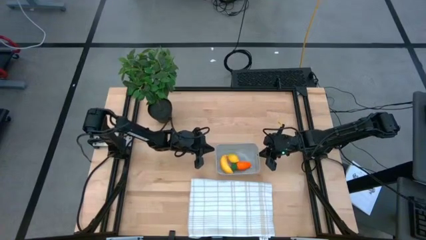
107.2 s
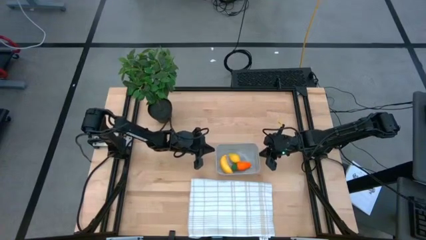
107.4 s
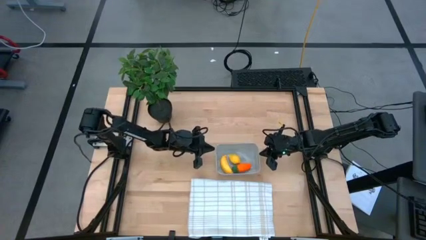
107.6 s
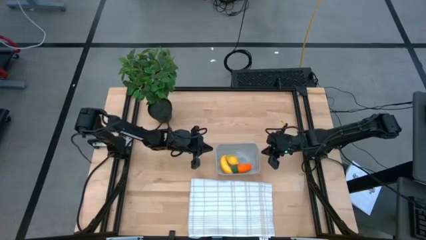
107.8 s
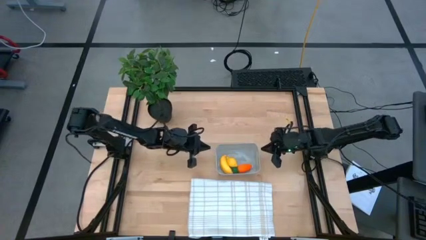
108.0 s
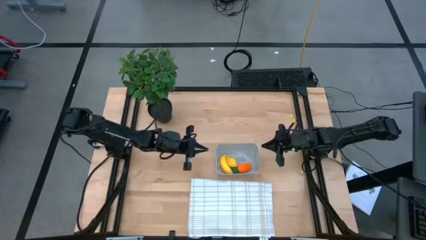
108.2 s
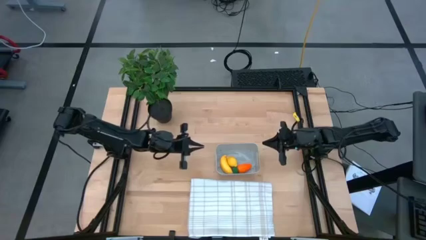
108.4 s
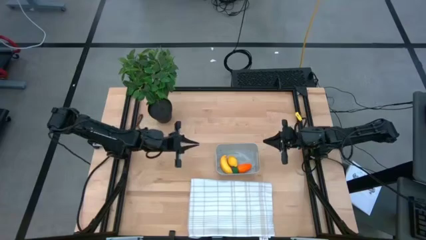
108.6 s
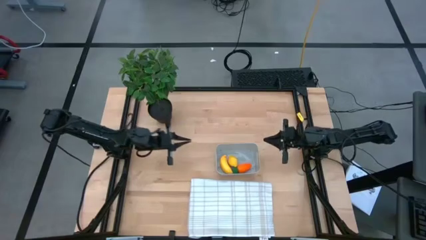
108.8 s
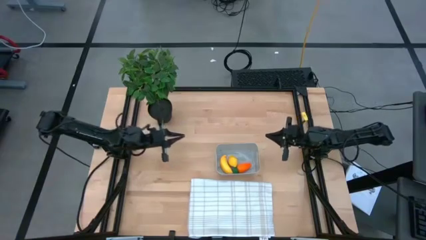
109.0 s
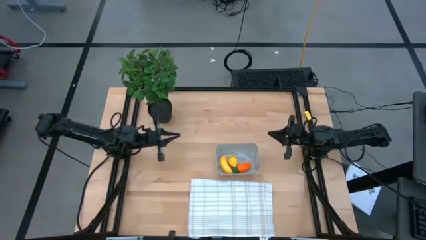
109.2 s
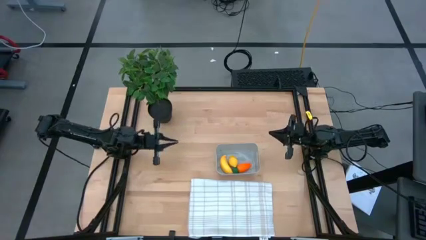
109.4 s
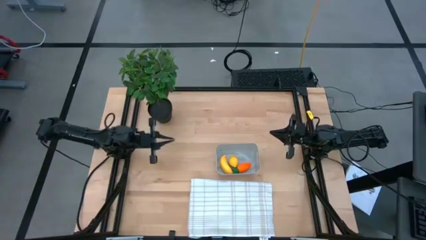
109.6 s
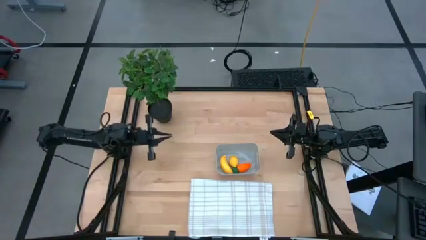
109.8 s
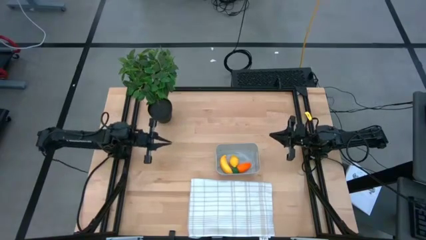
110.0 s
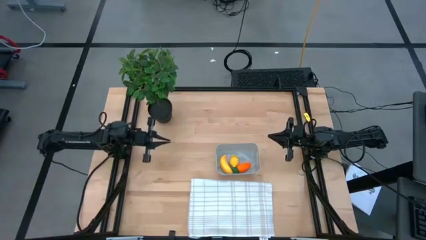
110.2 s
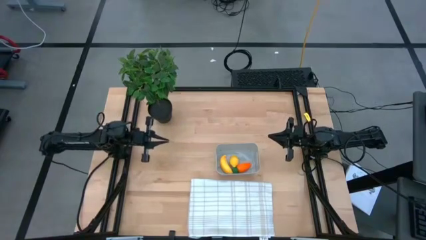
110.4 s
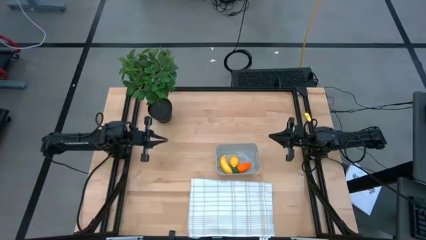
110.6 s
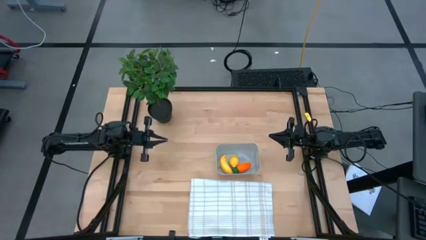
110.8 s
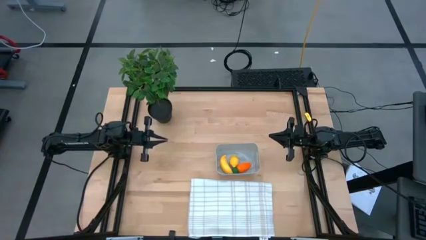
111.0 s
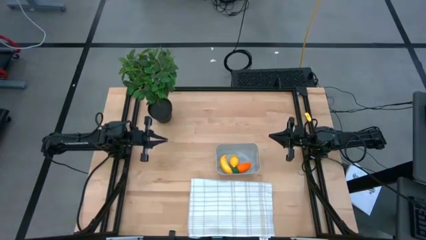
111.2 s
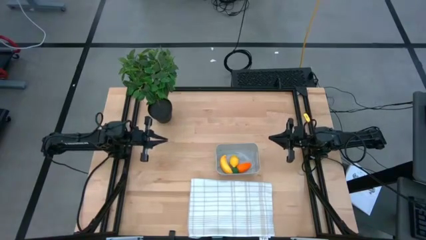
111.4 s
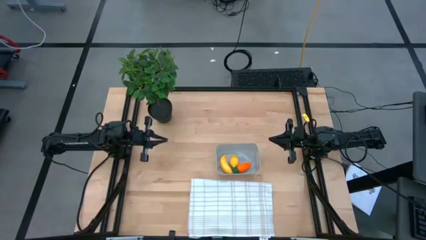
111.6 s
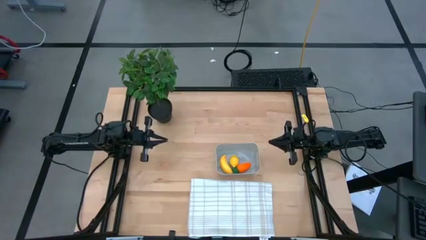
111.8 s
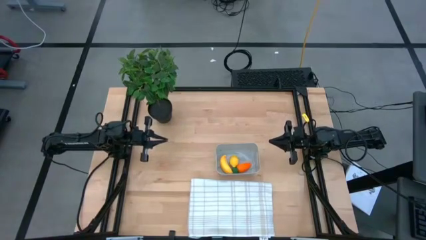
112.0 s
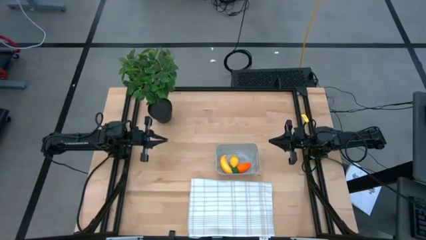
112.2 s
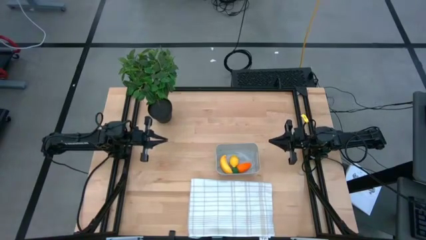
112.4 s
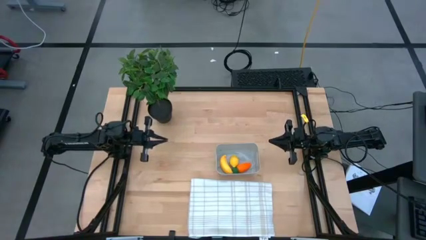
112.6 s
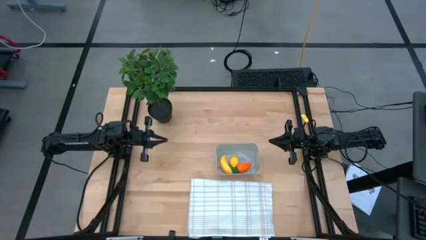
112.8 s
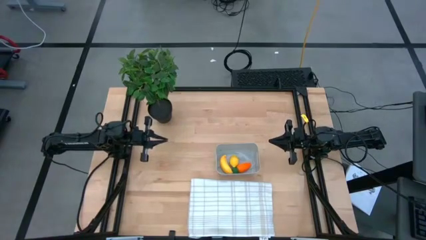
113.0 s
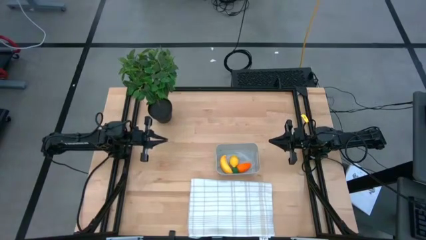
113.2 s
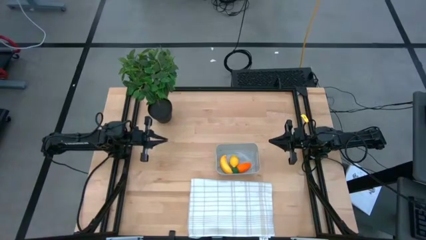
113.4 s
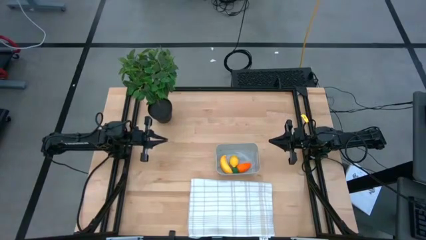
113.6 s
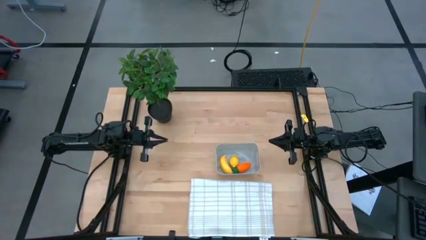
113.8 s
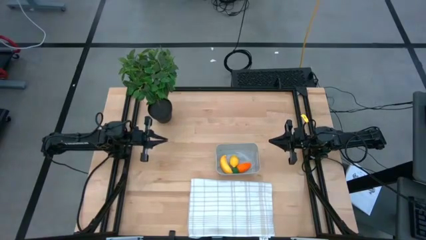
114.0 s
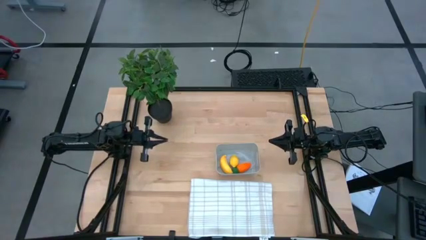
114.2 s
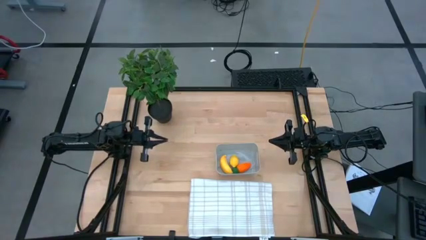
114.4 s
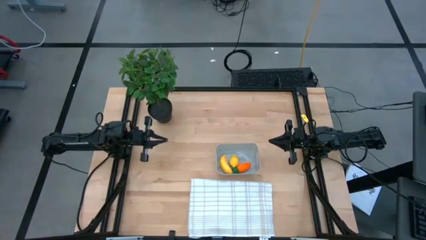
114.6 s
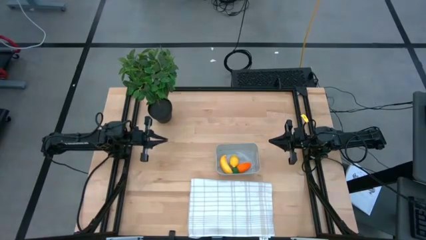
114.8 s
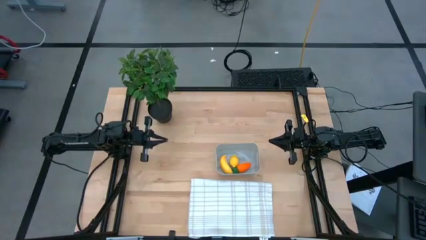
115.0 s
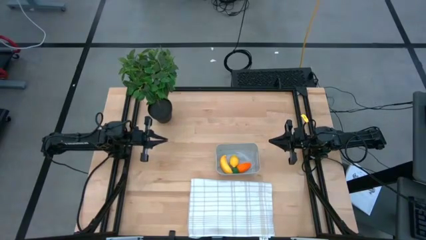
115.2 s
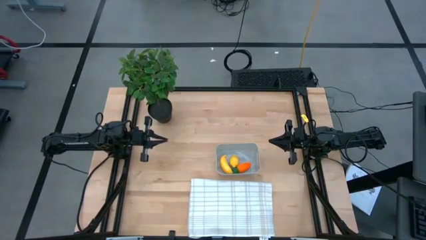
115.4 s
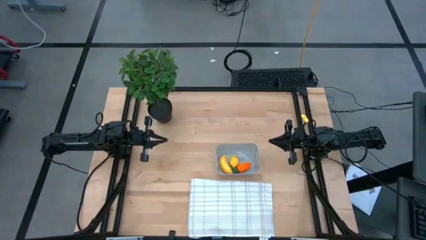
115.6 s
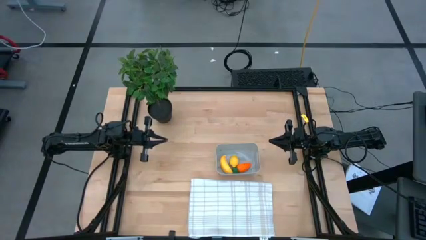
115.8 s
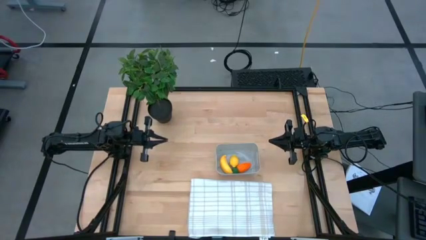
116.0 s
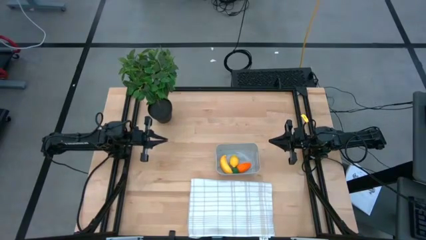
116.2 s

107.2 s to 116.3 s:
Task: Pick and placing Produce into tupperware
Return to Home Position

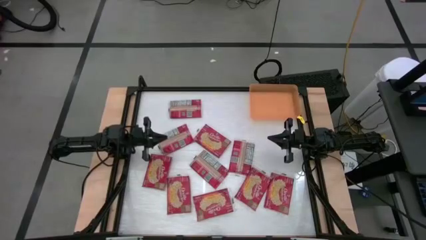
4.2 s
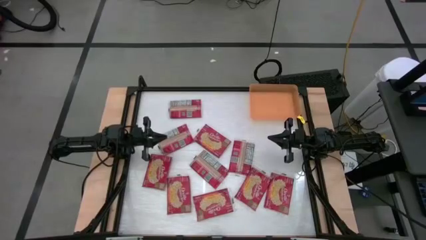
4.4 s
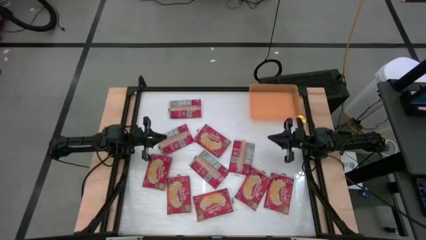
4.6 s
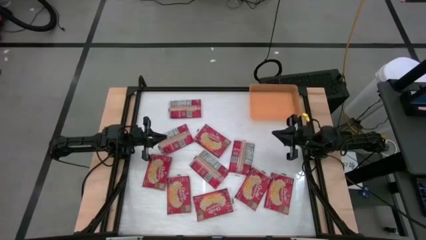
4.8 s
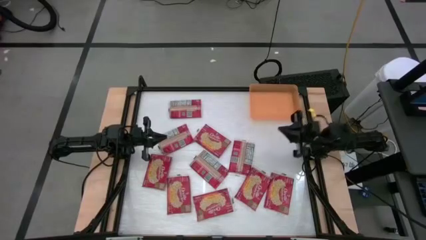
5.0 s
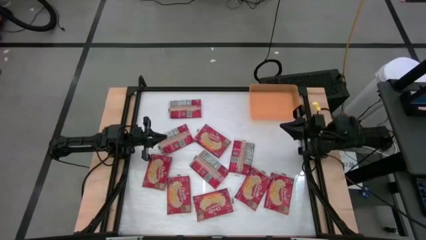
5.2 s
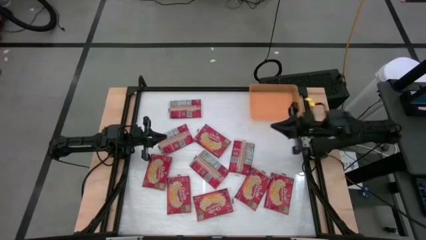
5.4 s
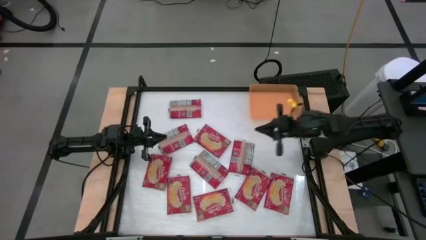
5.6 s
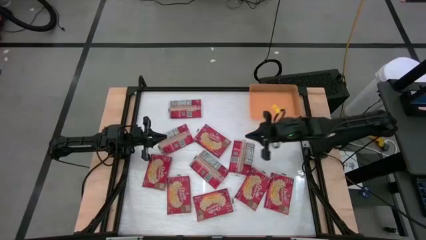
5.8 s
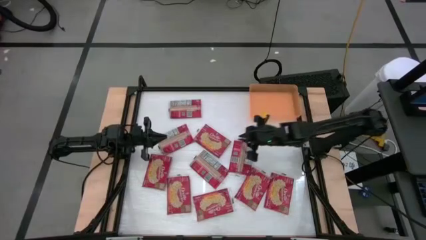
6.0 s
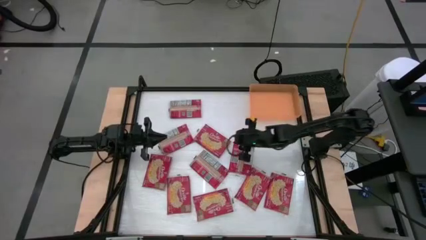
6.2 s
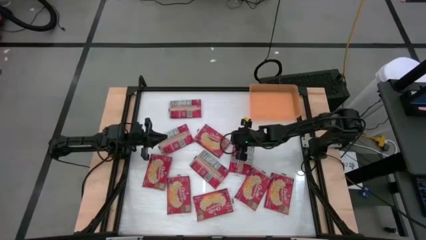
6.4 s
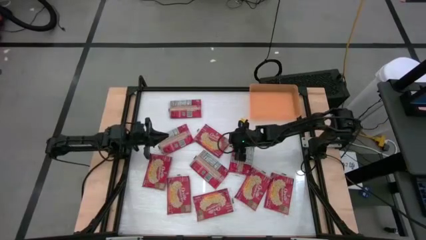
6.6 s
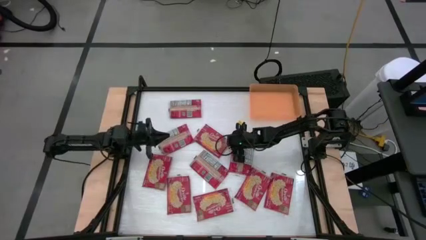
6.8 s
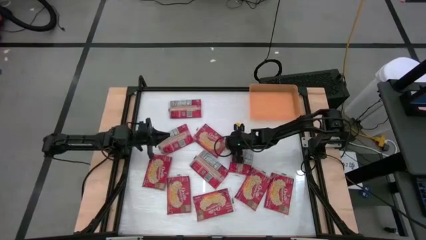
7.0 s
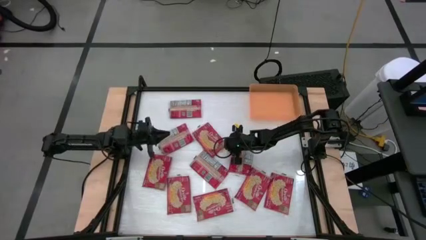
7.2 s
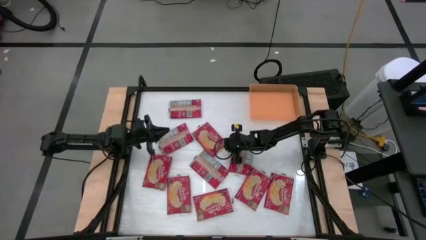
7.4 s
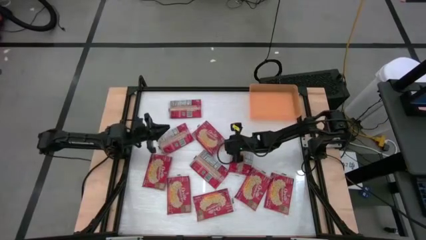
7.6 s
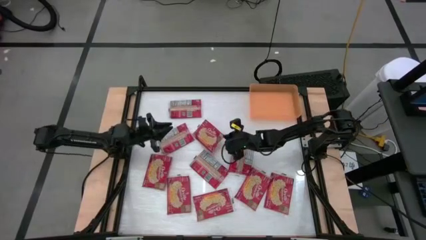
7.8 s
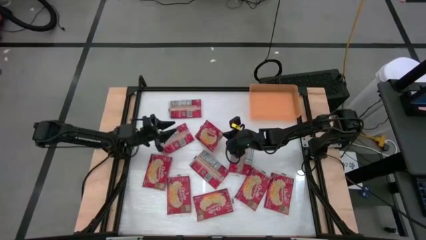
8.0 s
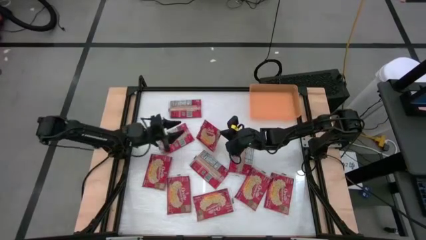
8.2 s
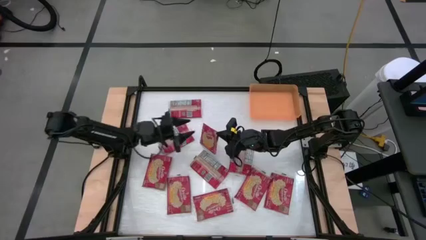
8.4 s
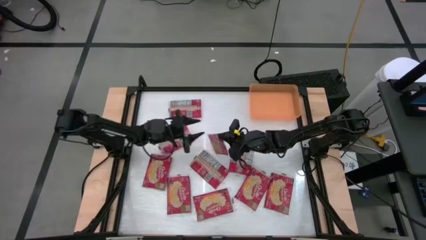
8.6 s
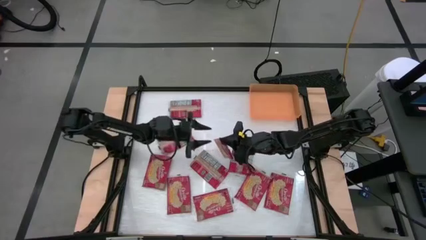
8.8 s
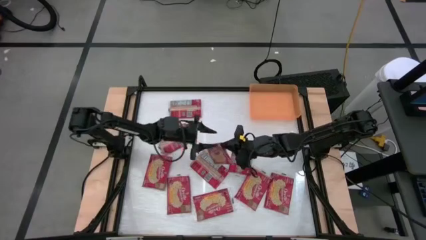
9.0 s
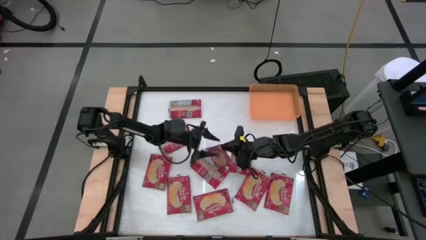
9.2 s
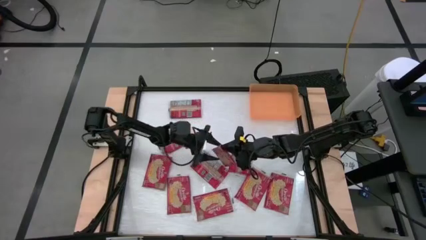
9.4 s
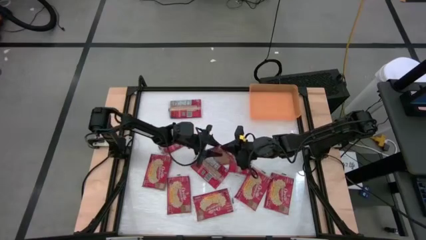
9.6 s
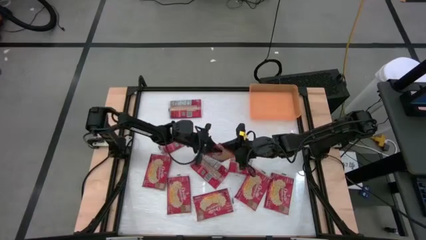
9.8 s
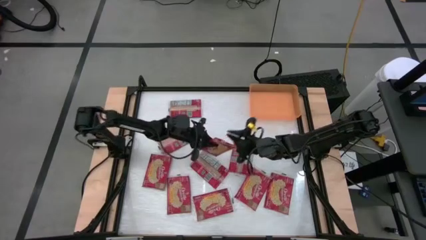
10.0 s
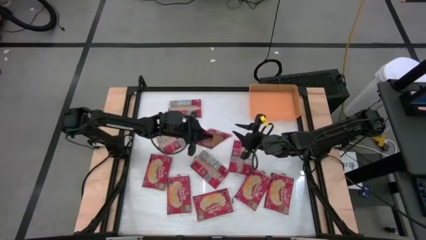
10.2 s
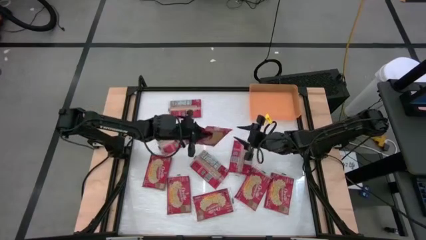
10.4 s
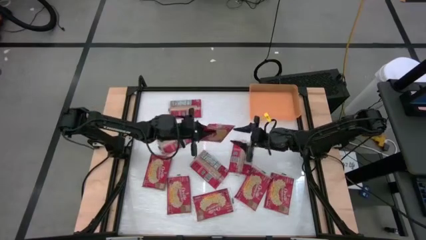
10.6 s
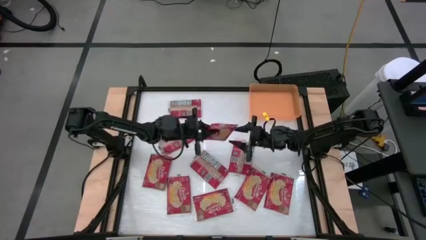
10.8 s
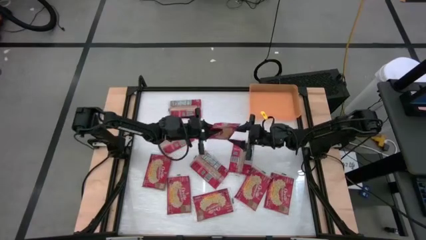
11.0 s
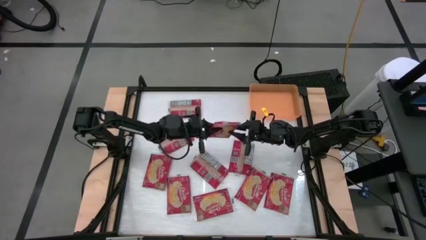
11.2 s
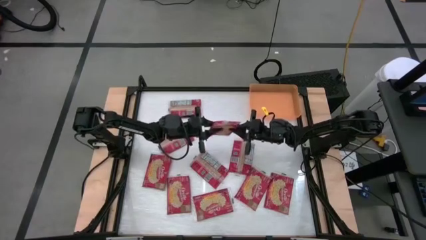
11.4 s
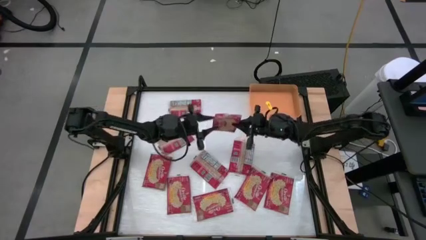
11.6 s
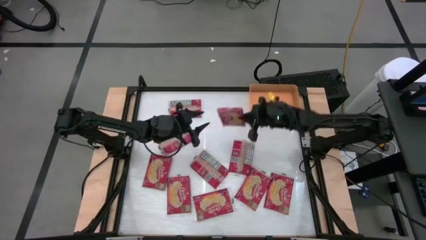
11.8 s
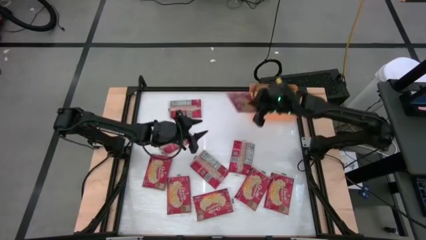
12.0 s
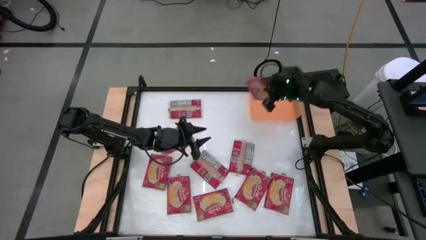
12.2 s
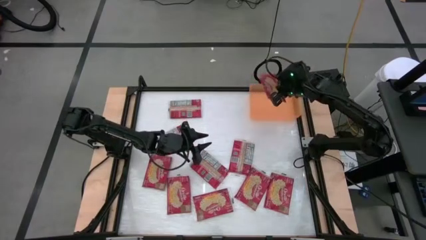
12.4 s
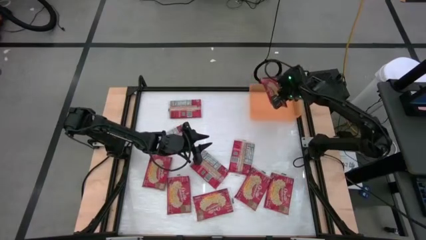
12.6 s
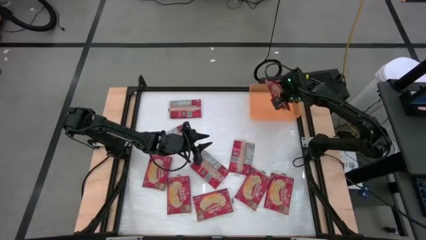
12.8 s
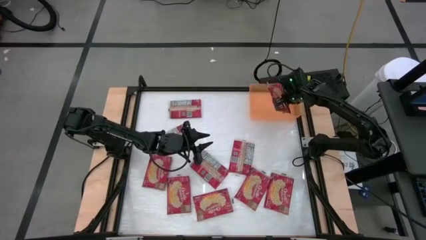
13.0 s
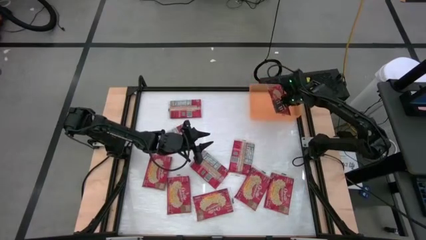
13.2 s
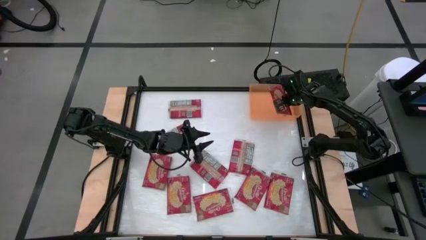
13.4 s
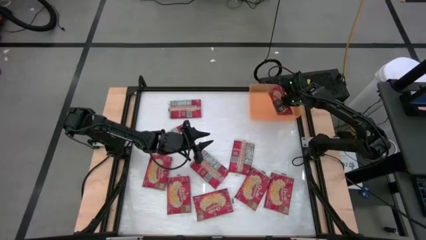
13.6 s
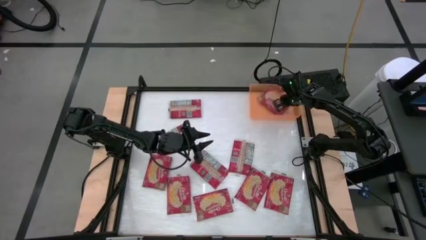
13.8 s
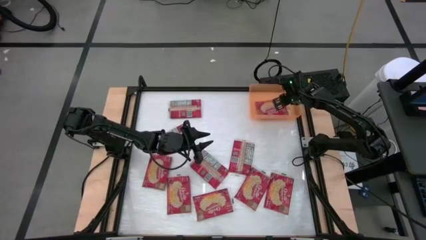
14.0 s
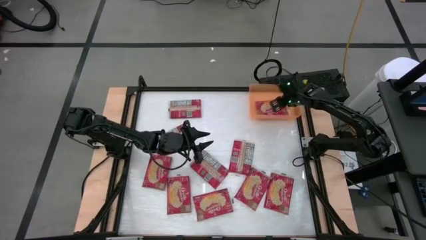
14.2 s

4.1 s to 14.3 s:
Task: Sort popcorn bags into baskets
Put the red popcorn bag into the orange bin
